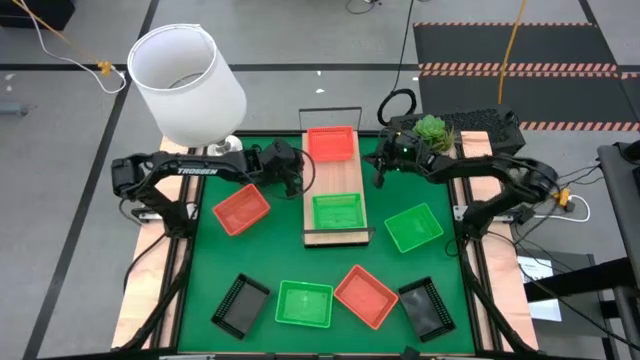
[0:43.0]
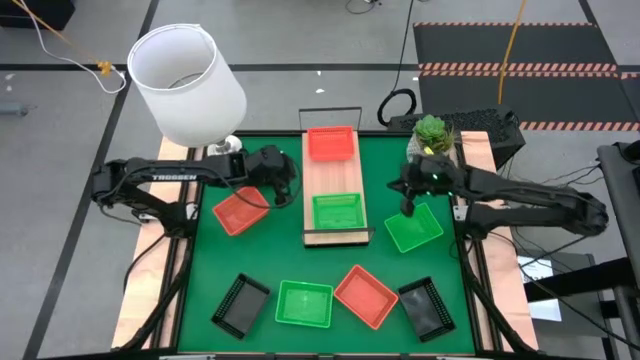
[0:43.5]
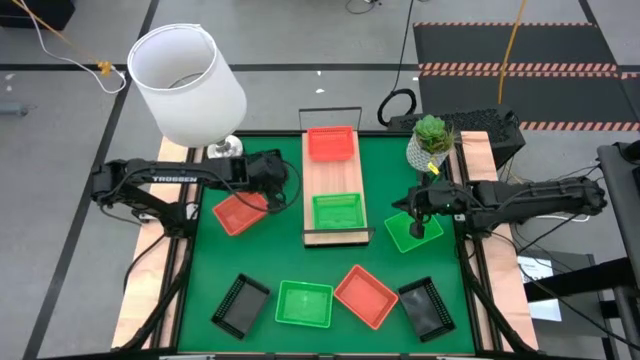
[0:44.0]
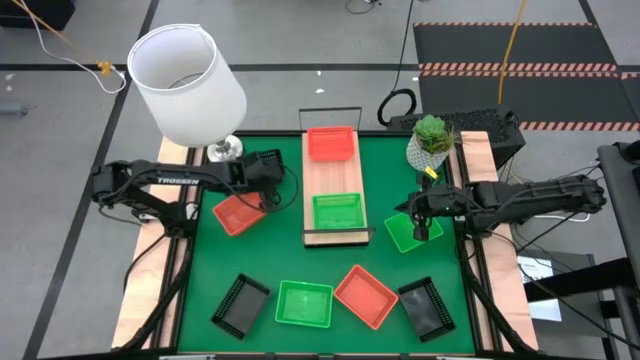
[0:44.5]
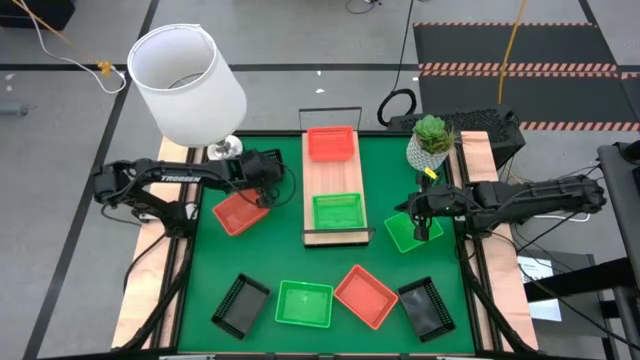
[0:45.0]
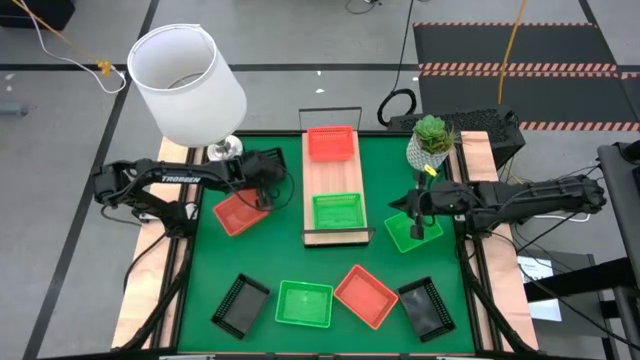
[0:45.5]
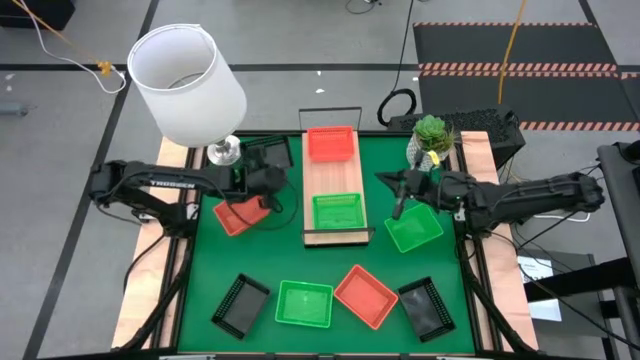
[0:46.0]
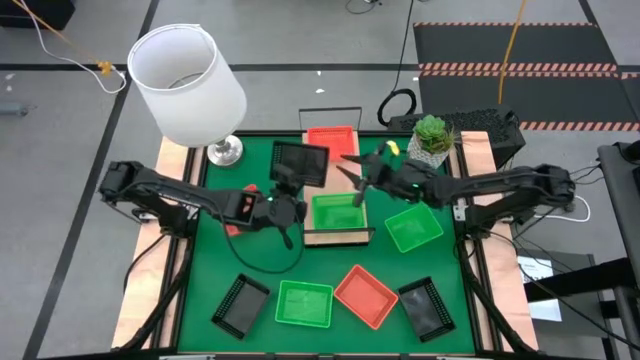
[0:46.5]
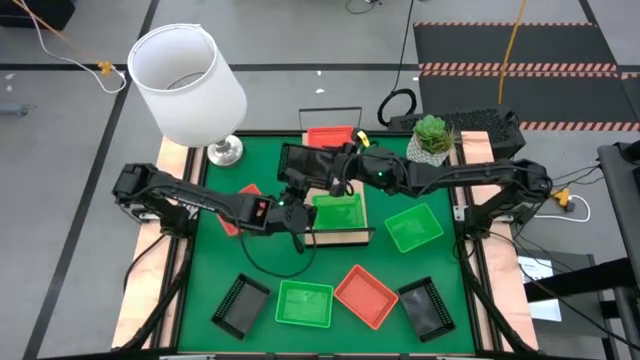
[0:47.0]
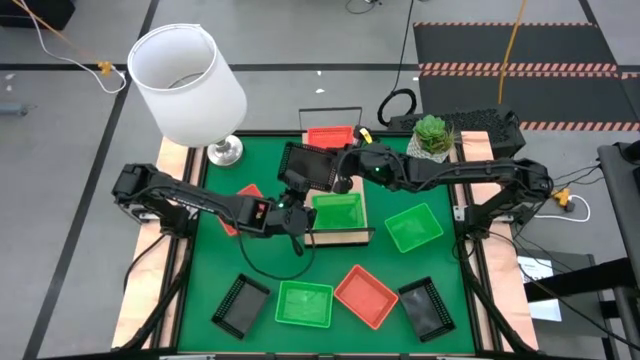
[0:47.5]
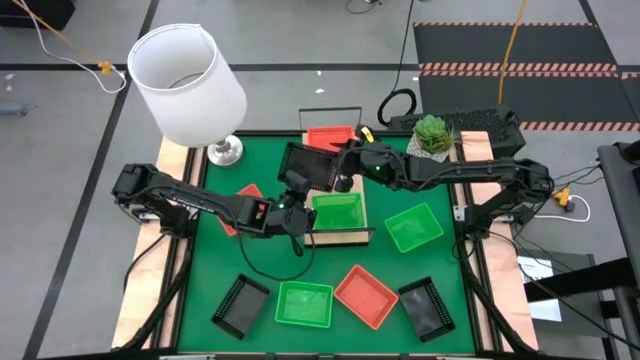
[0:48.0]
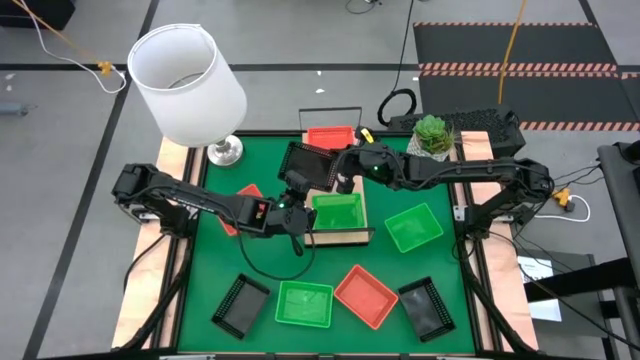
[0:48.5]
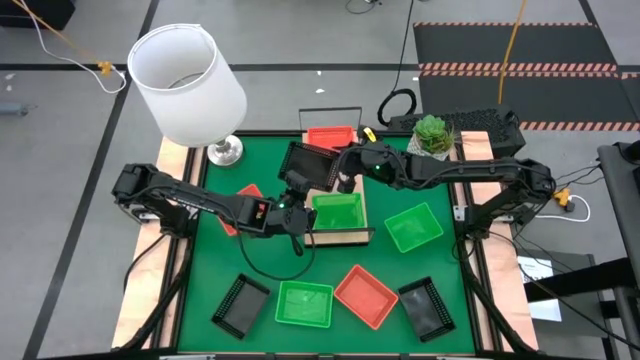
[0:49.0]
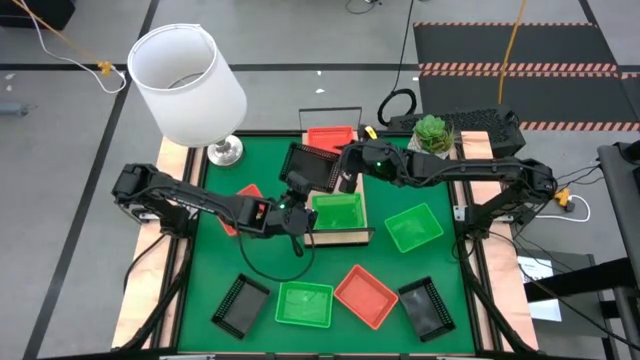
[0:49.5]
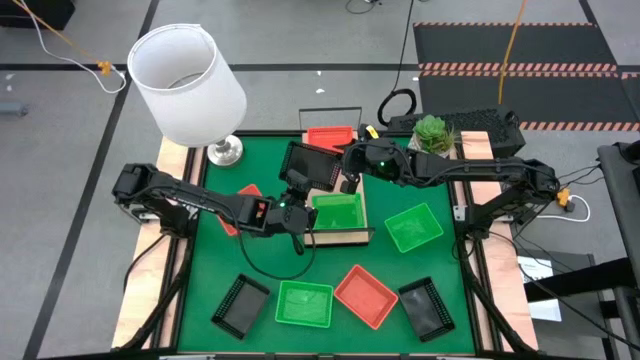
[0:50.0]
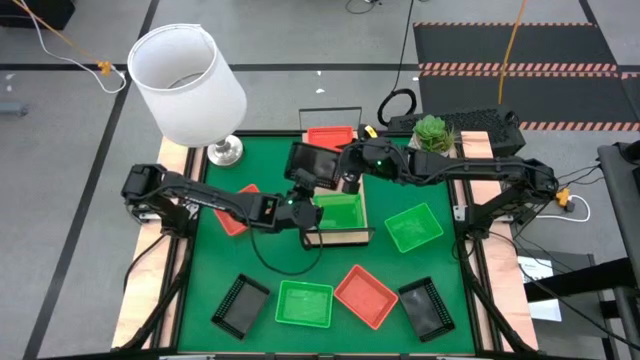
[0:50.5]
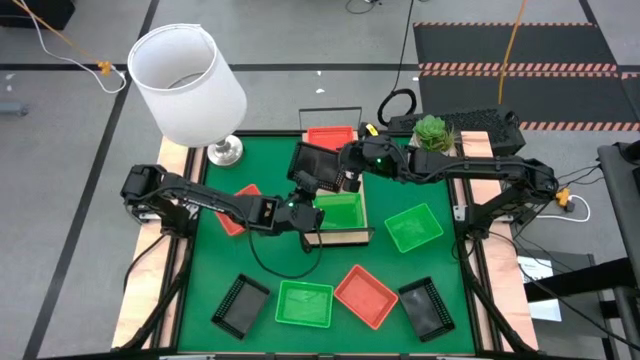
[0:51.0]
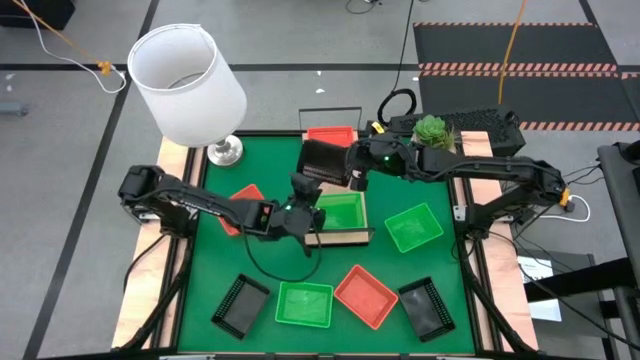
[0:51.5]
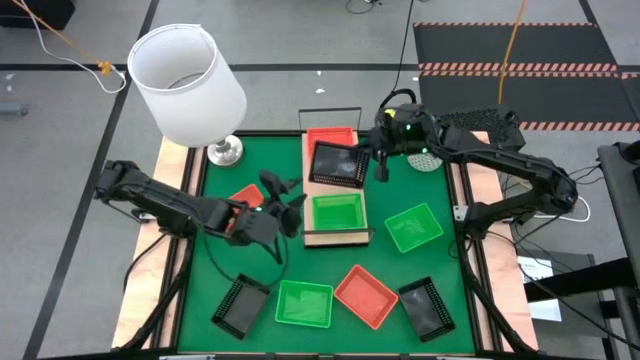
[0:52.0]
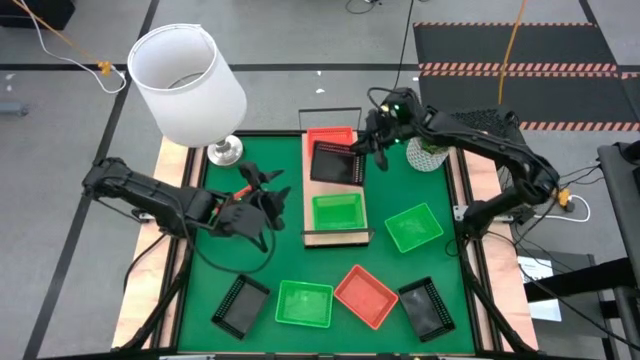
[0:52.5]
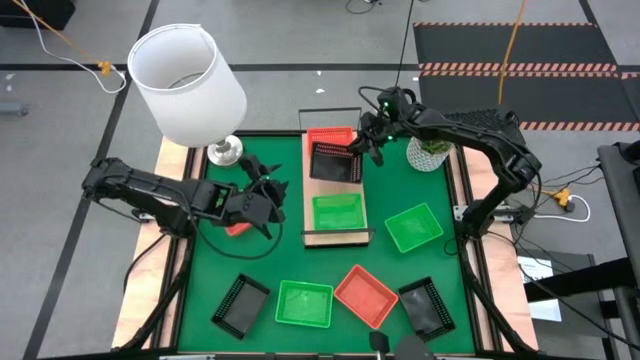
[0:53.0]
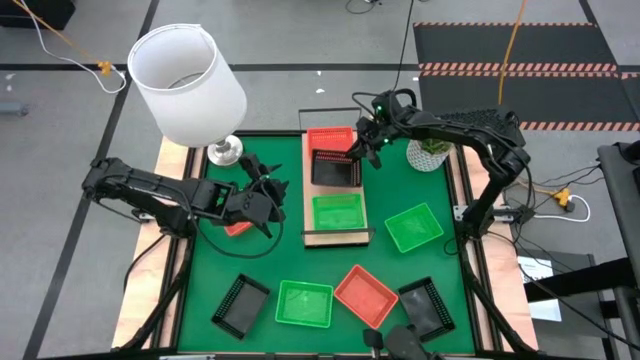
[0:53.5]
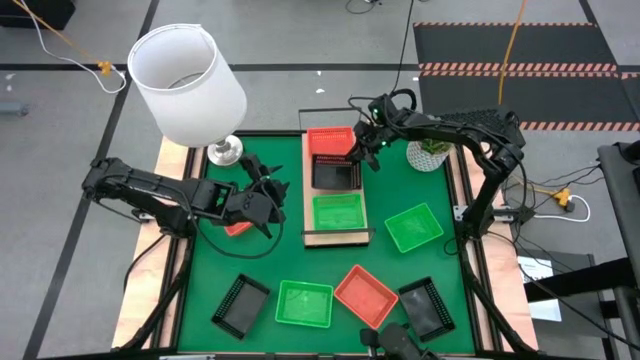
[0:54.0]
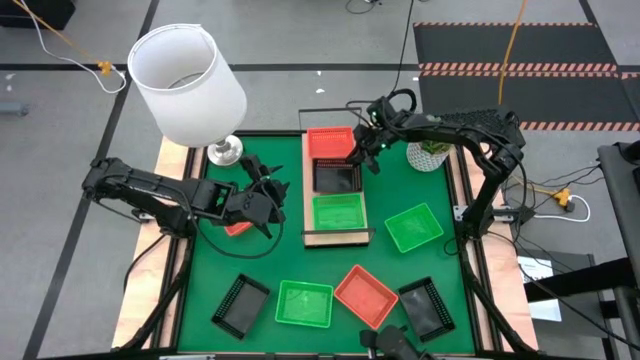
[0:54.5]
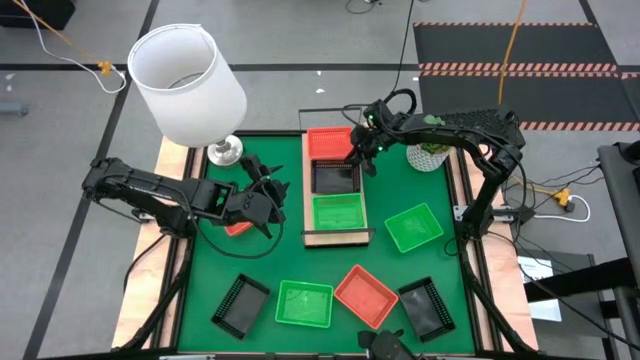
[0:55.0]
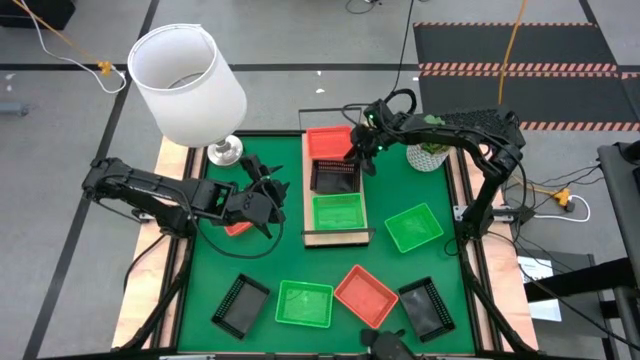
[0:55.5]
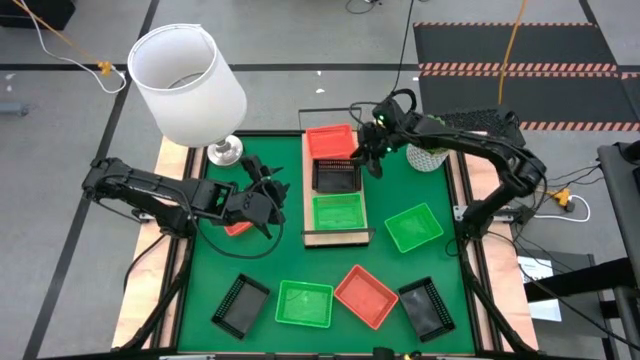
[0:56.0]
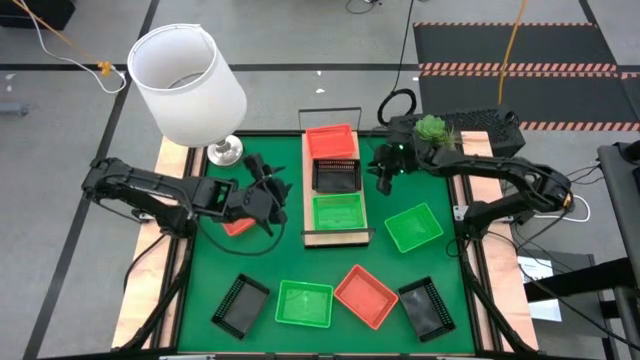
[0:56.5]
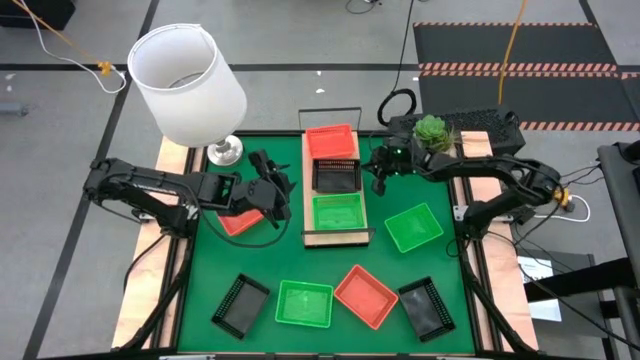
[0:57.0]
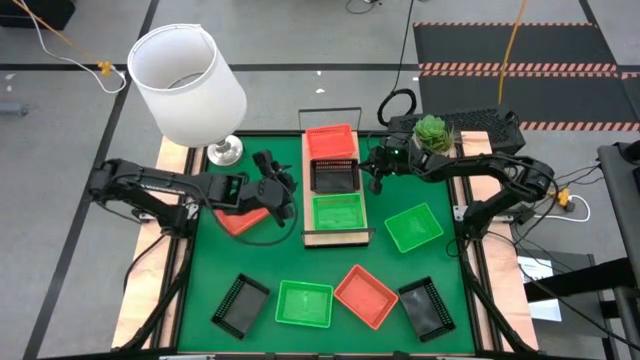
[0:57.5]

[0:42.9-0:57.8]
Task: Stack baskets on shelf by color
Put the top black bin on the shelf

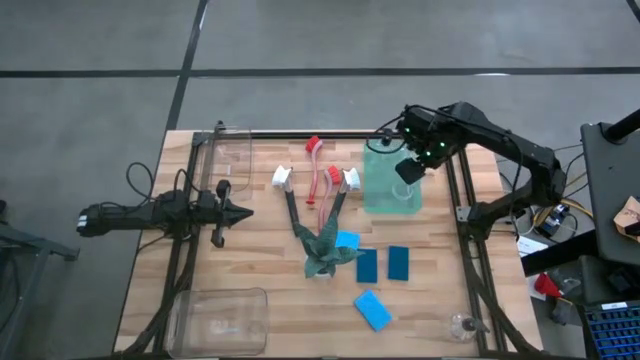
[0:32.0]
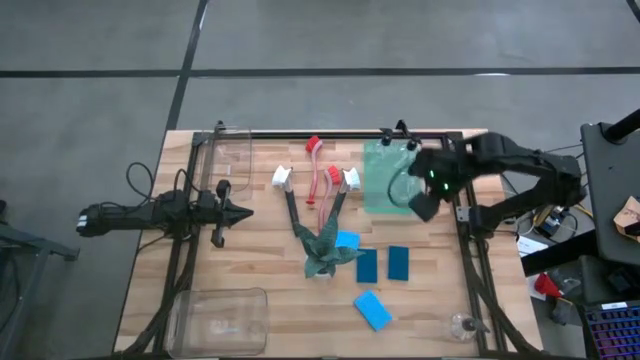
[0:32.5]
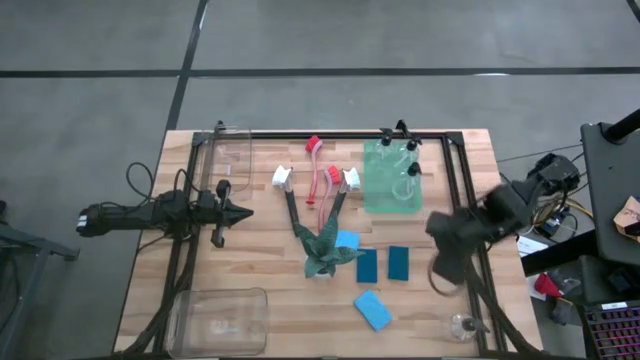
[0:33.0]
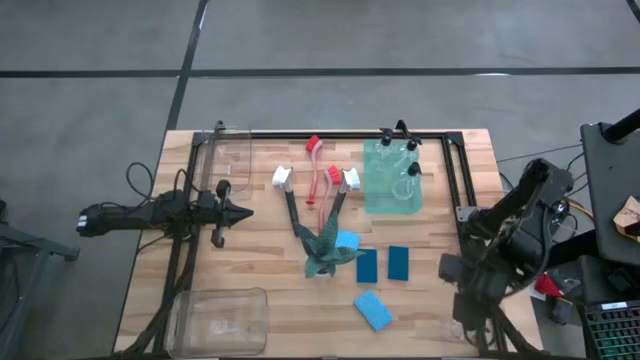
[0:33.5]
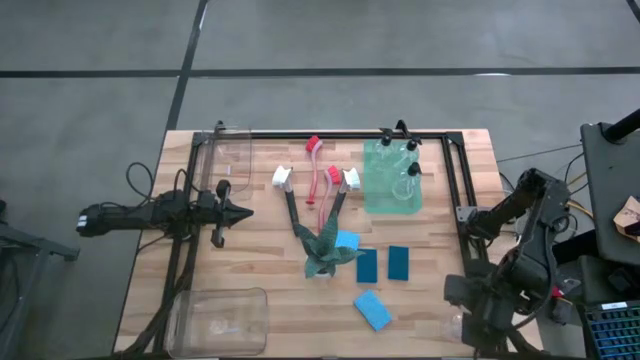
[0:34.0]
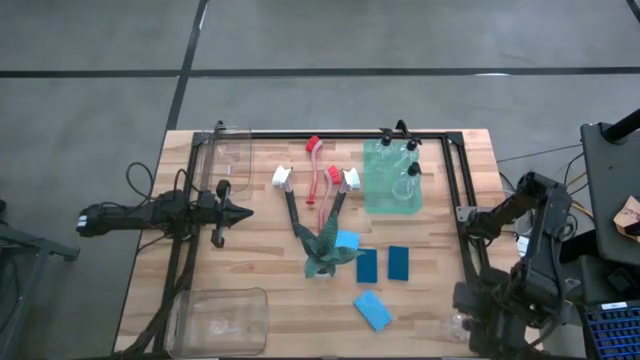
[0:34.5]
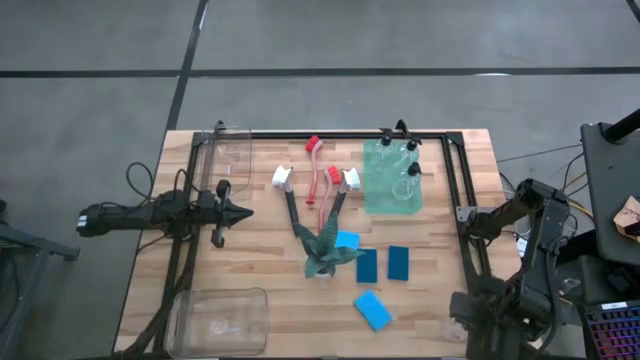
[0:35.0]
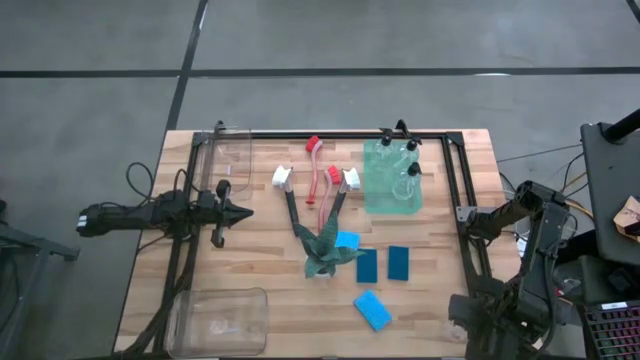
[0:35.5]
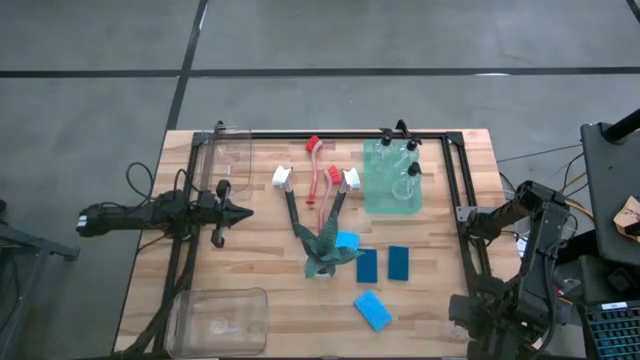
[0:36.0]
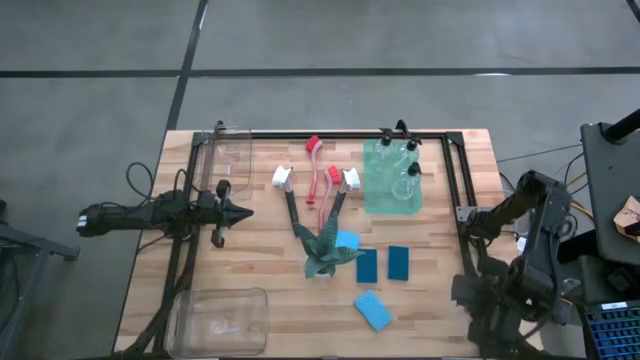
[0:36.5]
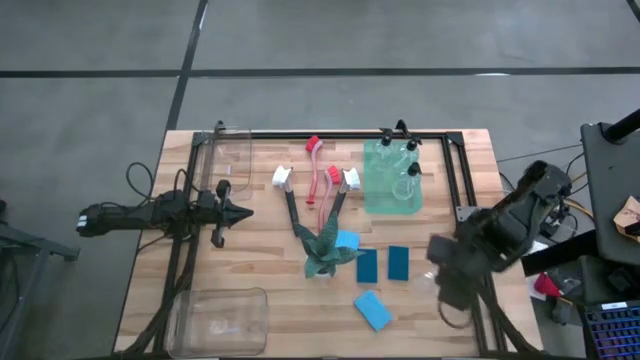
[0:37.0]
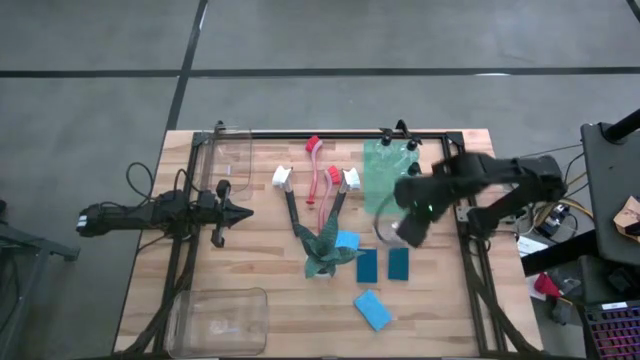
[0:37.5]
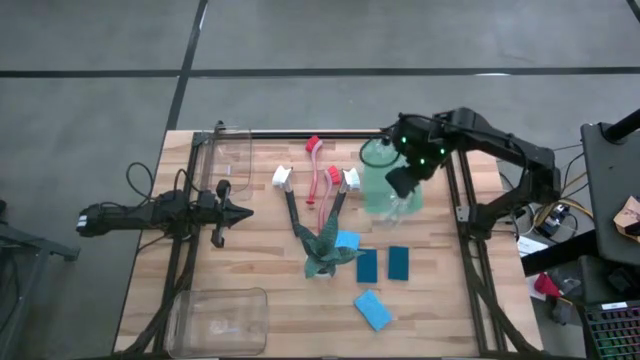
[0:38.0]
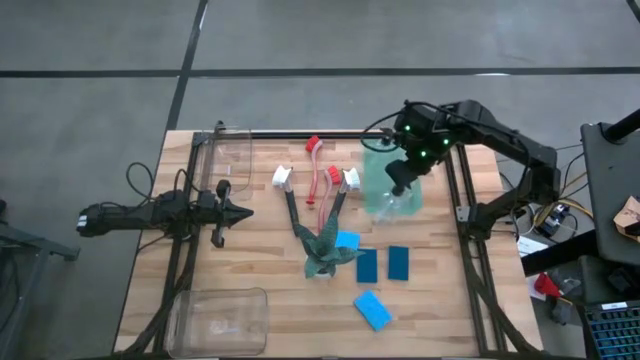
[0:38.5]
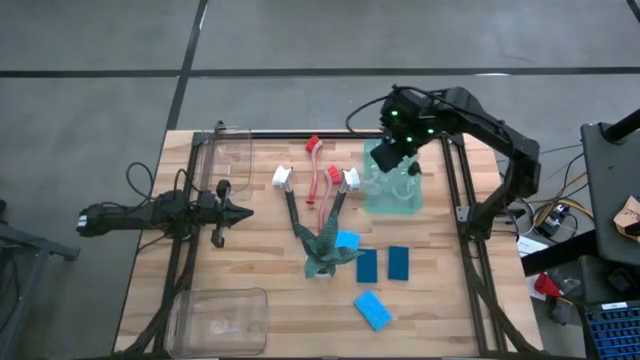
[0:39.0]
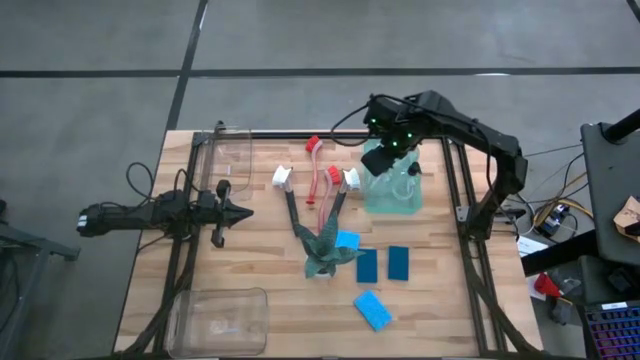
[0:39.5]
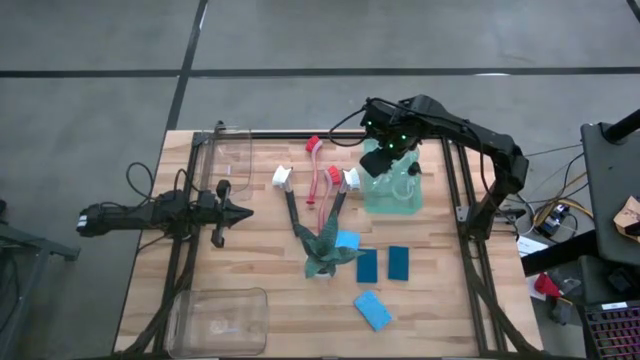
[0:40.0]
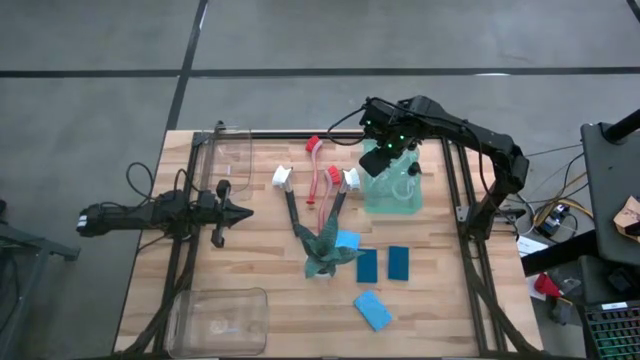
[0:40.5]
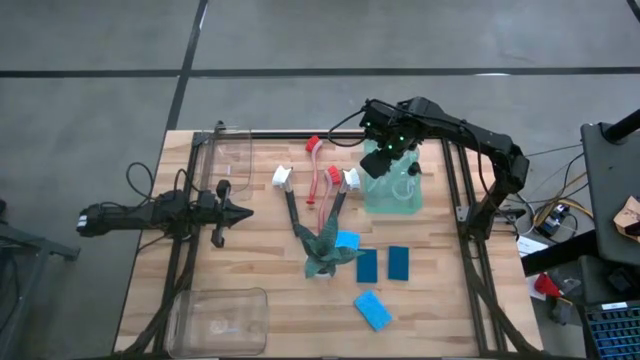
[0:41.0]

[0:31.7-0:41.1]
Task: Pick & Place Kitchen Sink Supplies
Put the soap dispenser into the green bin
